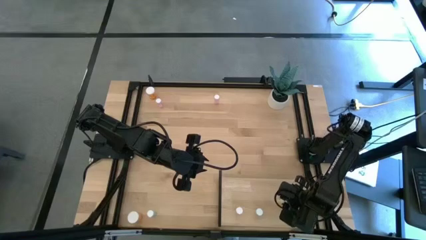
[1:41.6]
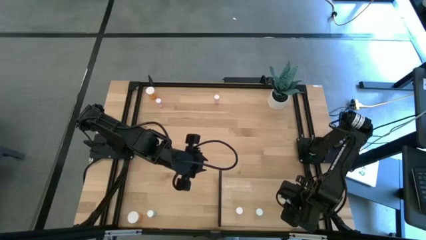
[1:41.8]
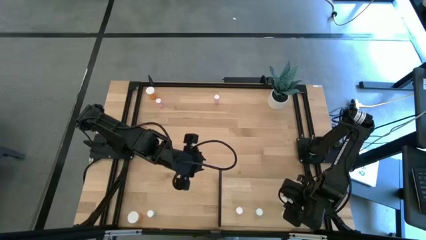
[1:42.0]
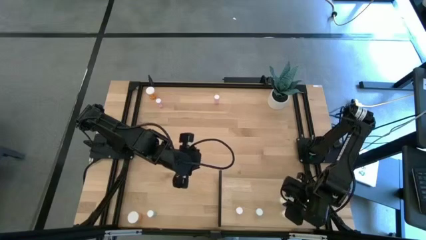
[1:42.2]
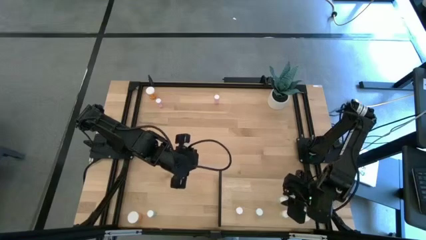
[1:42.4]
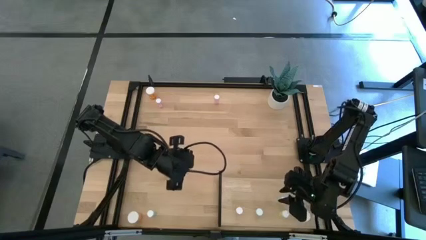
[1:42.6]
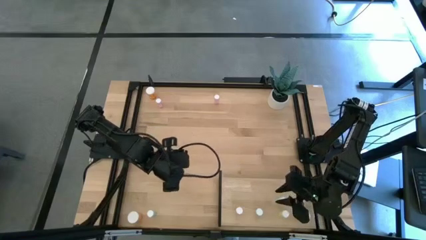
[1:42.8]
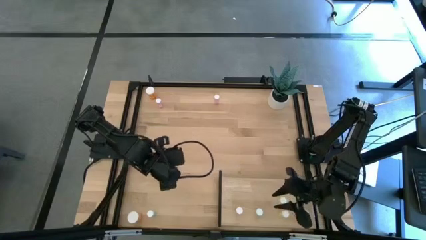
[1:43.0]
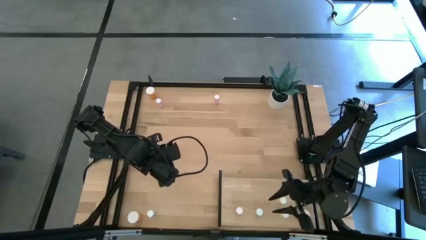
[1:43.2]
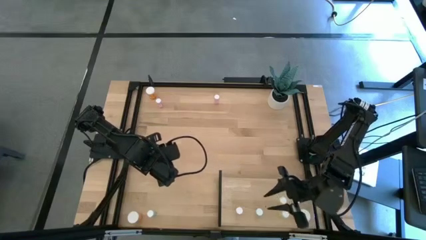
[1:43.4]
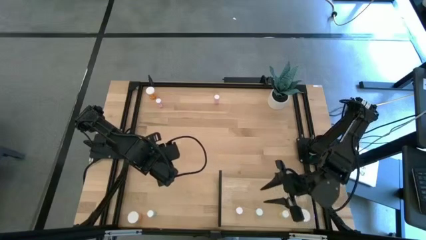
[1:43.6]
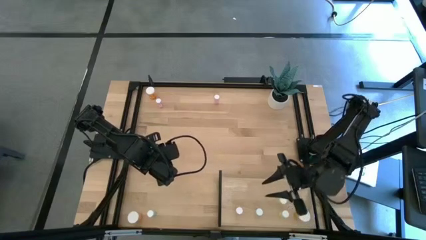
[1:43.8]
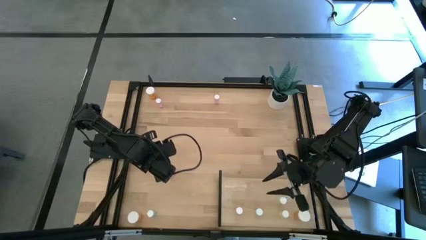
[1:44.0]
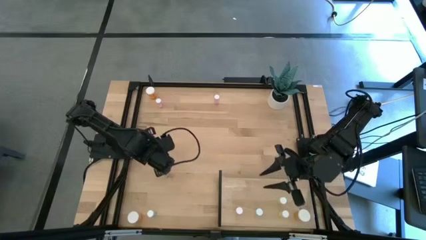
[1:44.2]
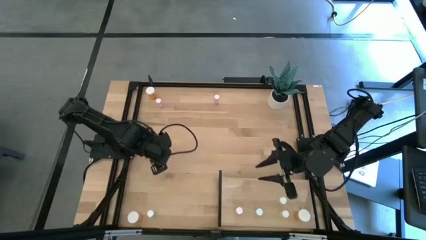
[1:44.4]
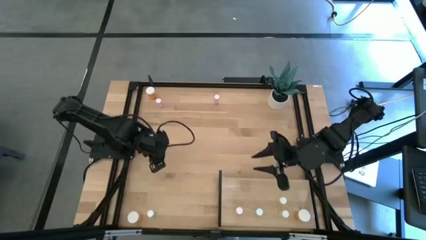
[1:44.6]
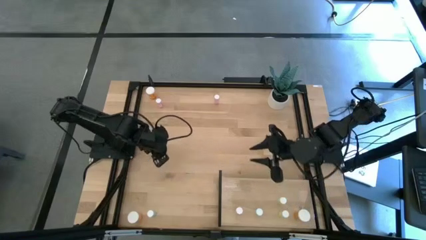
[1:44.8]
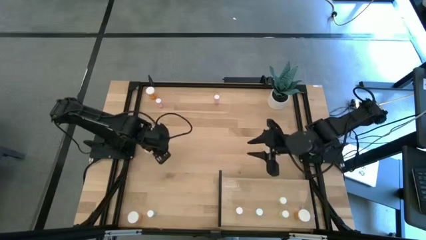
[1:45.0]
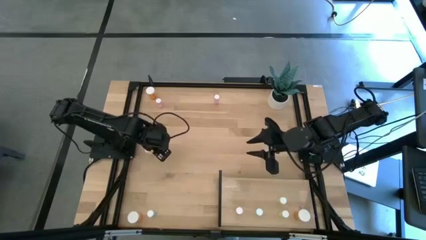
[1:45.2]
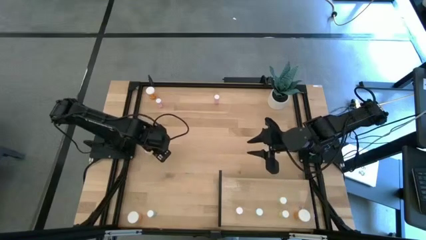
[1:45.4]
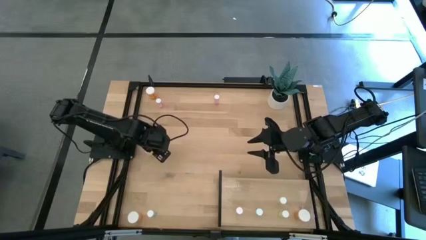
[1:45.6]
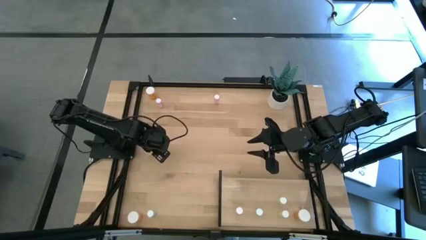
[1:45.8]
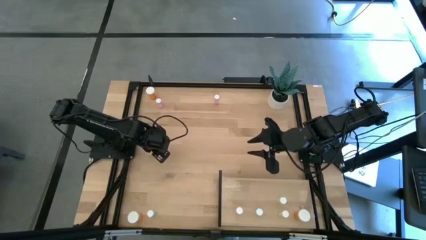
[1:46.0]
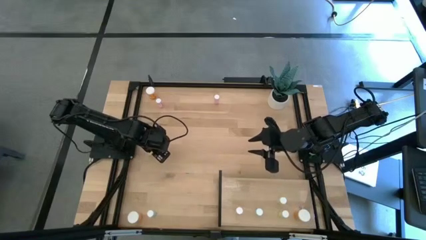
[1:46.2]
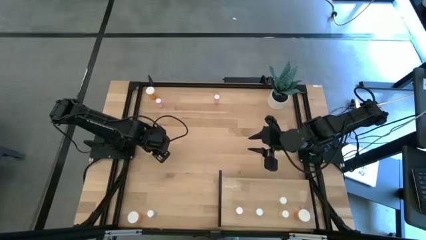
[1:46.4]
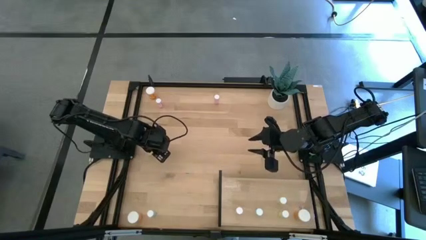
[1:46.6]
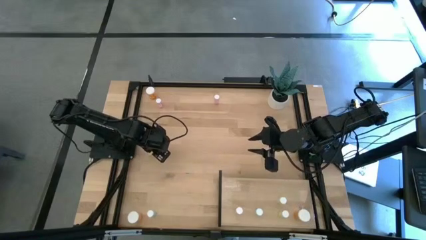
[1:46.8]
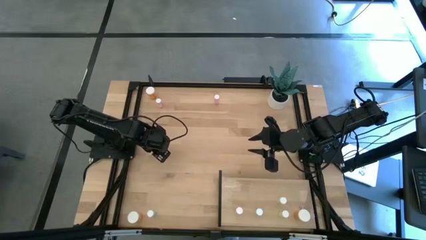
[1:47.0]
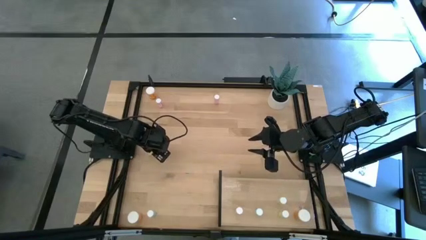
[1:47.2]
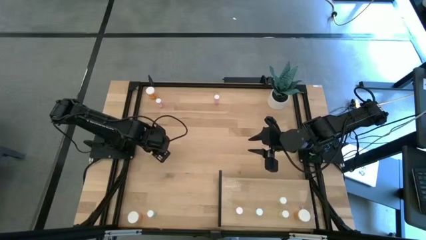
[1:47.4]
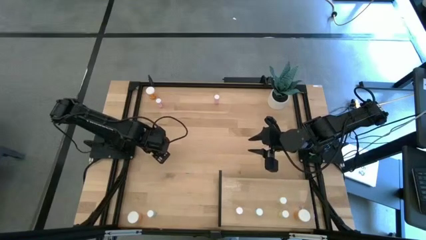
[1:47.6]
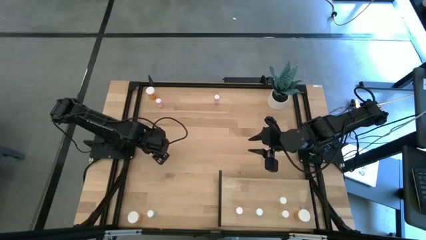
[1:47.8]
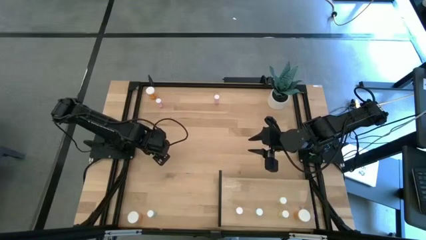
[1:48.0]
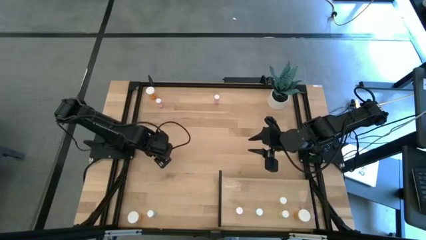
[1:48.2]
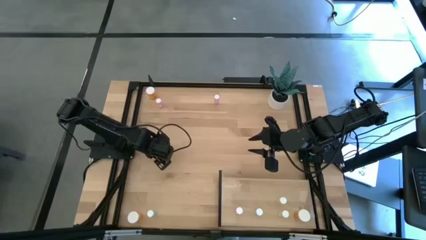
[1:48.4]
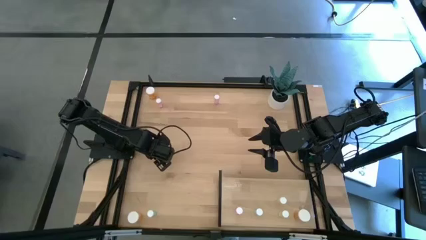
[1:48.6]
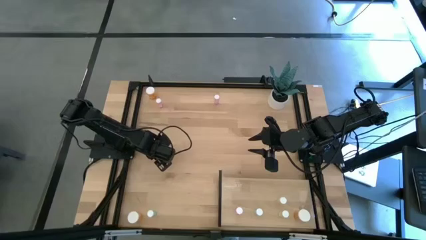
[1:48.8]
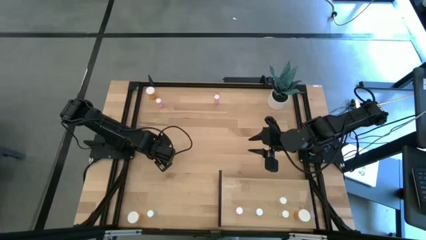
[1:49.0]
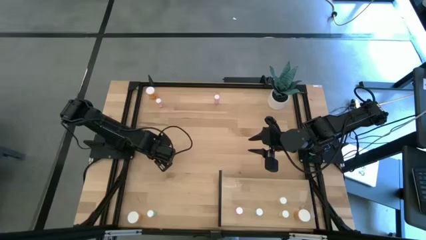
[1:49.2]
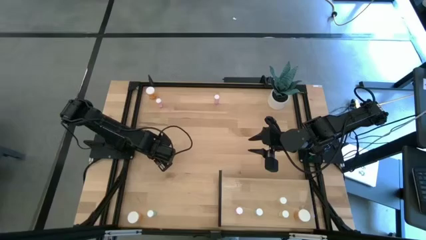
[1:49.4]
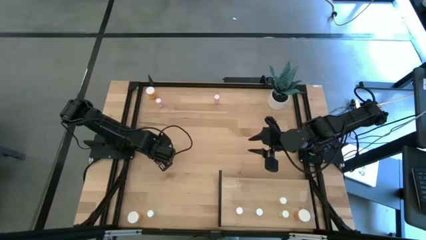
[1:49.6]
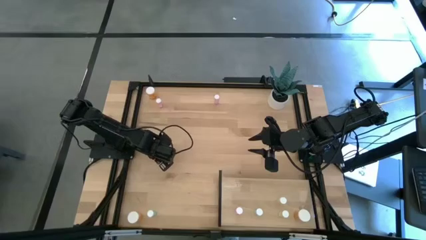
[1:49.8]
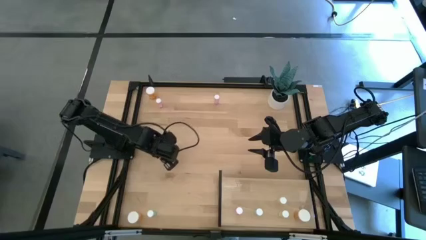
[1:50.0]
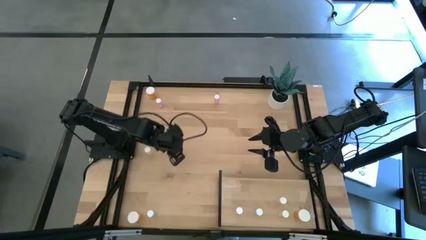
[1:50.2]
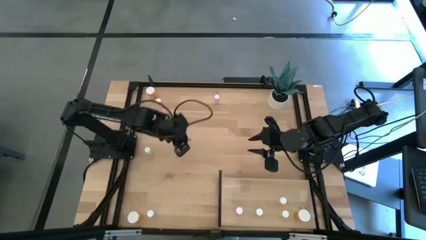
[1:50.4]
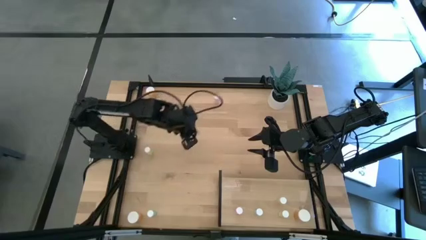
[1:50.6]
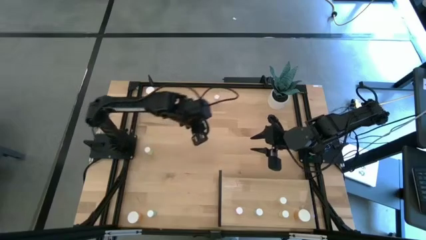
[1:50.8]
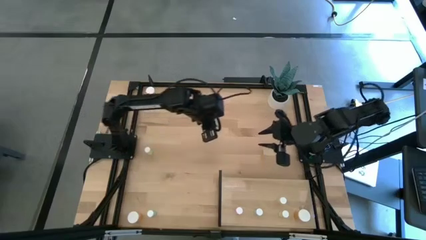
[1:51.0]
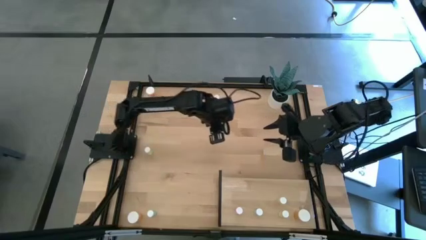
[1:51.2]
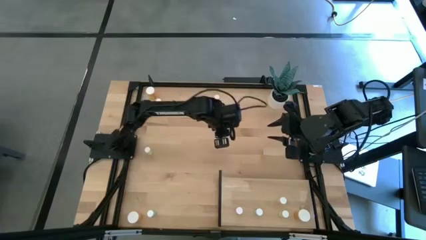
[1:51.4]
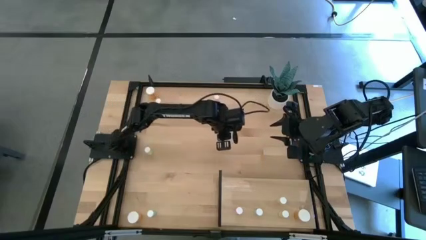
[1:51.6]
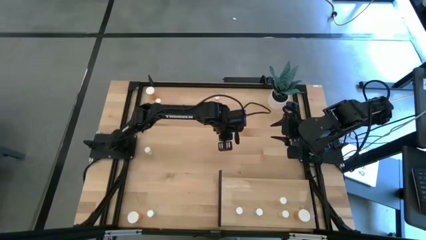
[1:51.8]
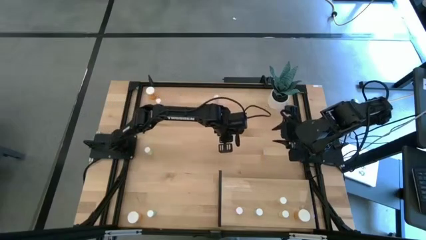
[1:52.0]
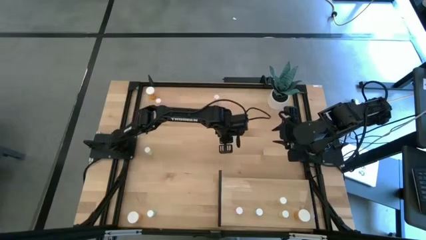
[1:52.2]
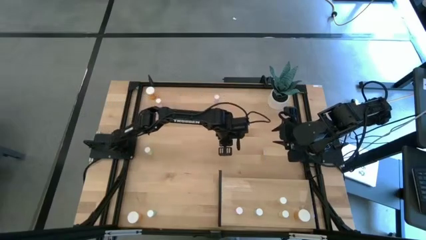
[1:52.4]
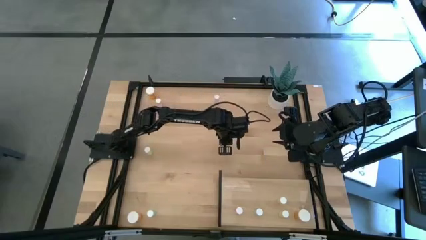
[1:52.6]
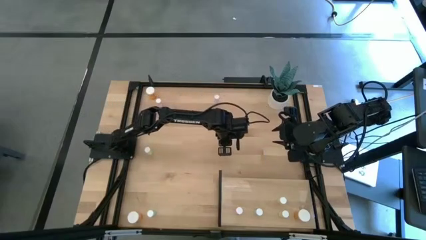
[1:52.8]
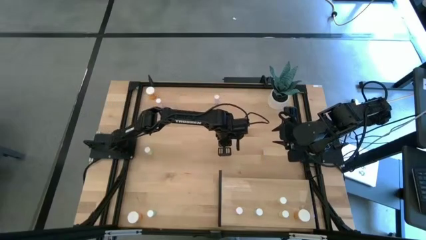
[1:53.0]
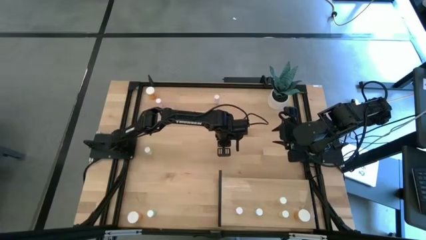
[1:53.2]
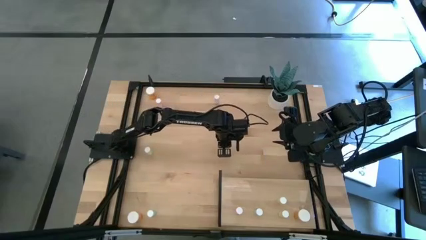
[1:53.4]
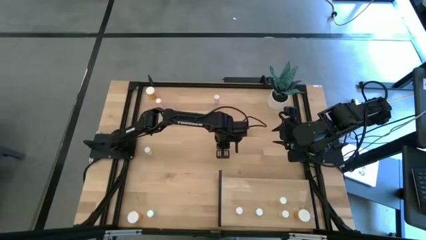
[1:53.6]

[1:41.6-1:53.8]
Task: Pick and place medicine bottles onto shelf by color
Put the top green pill bottle on the shelf aligned with the other green pill bottle

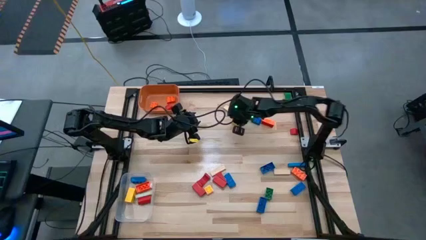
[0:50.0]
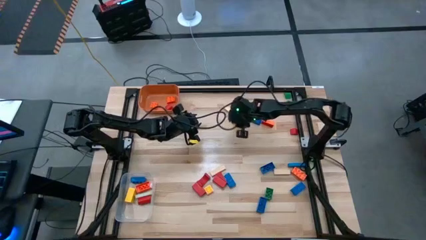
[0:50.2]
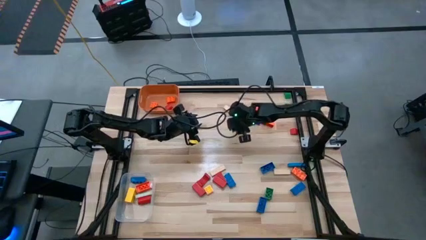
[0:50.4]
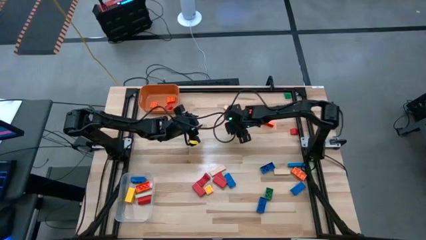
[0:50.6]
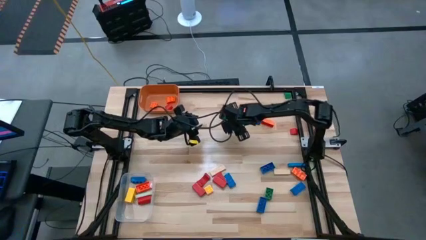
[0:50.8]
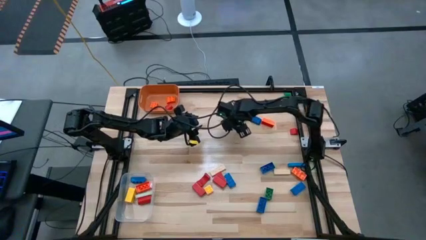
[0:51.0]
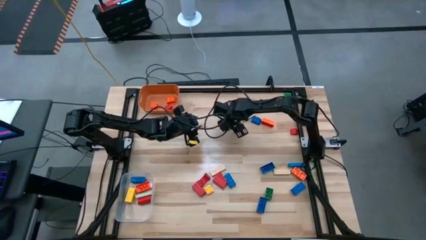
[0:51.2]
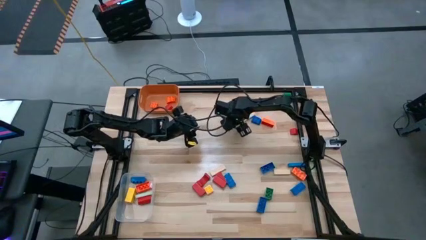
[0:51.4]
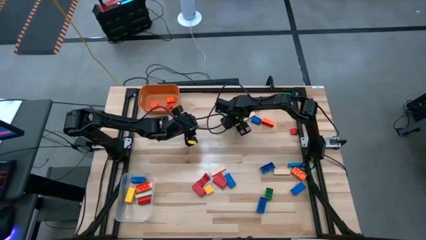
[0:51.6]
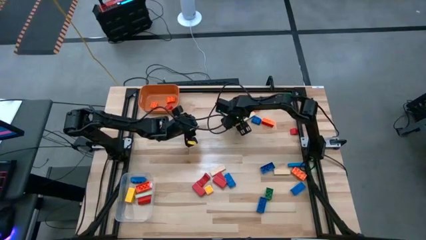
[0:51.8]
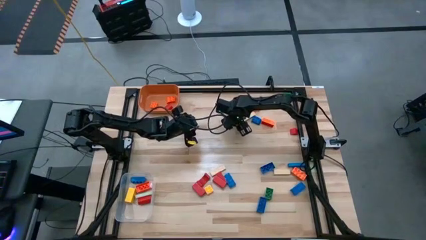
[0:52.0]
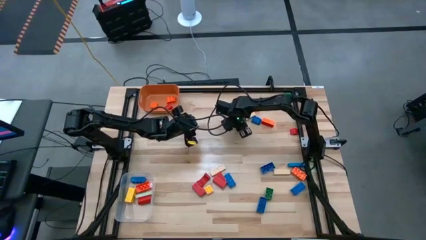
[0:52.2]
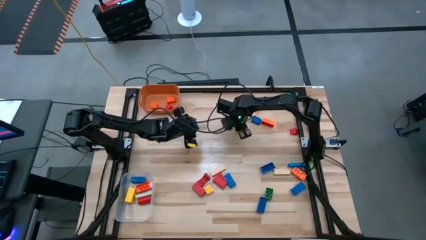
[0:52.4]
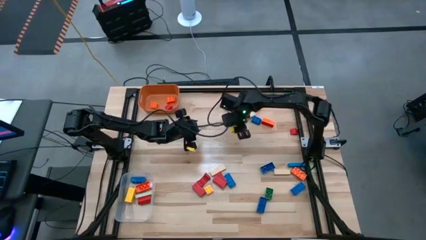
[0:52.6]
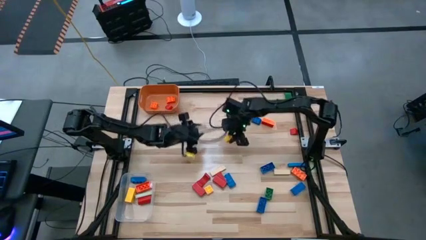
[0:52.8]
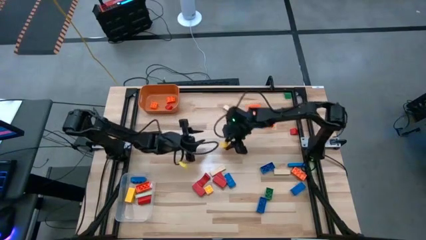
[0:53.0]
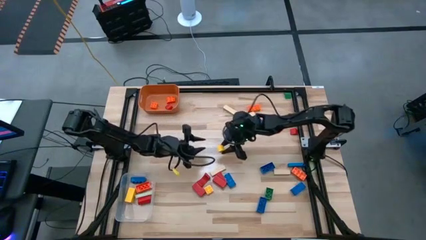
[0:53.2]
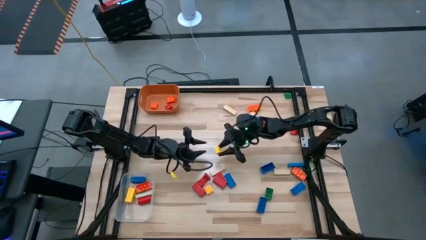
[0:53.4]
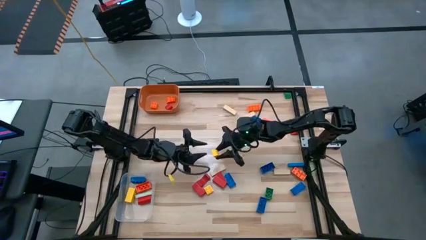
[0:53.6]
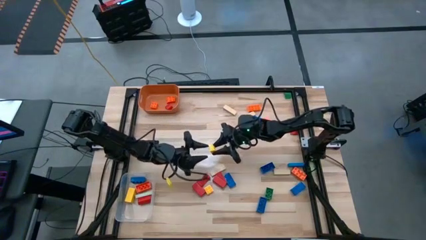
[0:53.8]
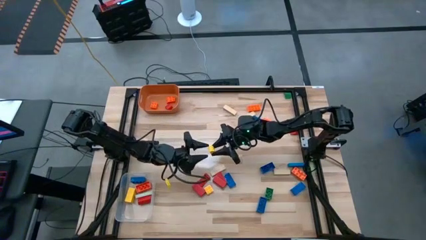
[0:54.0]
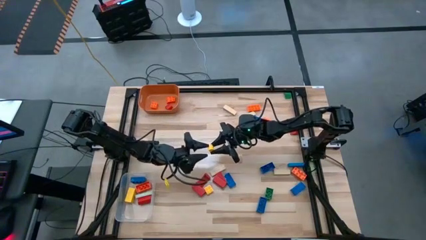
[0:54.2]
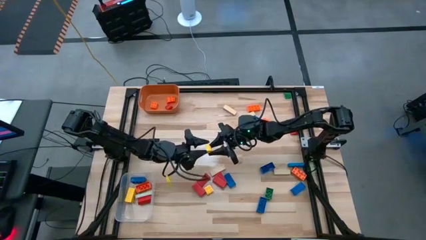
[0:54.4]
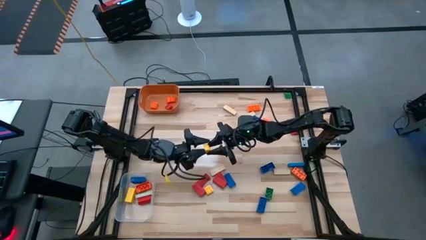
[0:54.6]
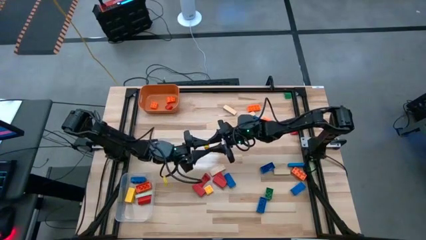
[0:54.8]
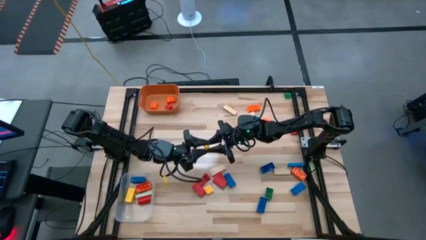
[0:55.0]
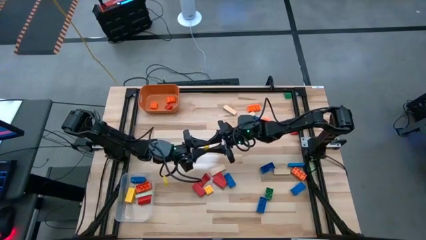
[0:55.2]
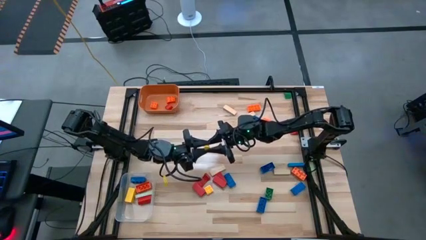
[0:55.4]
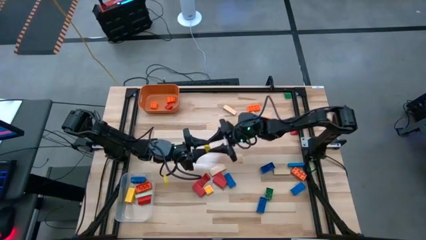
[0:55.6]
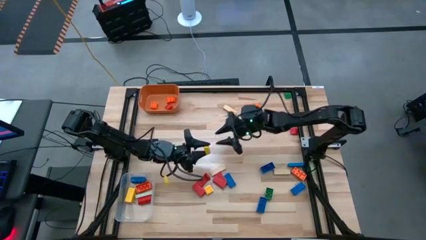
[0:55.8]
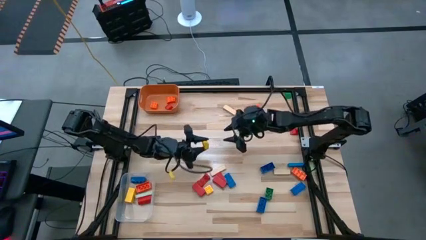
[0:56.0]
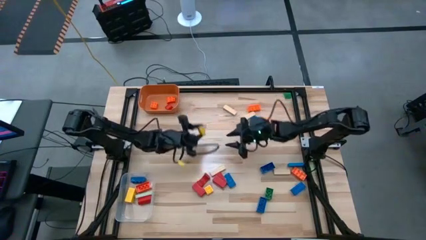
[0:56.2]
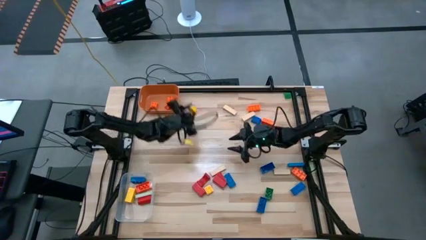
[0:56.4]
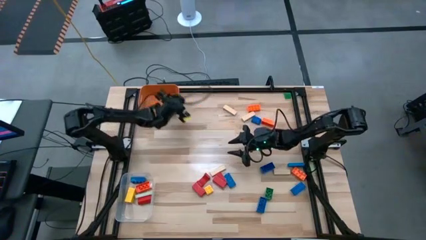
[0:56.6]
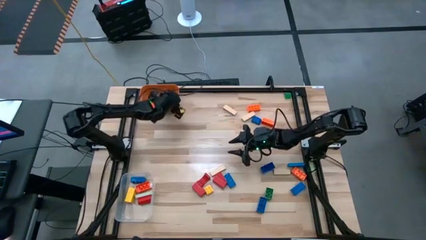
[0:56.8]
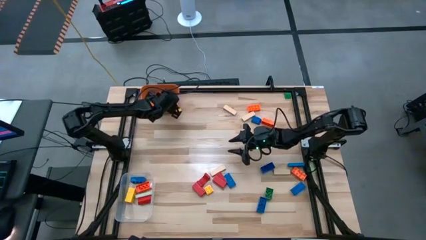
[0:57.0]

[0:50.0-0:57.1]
Task: Sort blocks by size
Put the small yellow block into the orange bin
